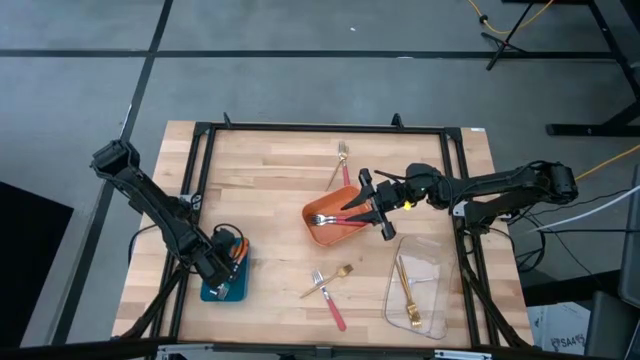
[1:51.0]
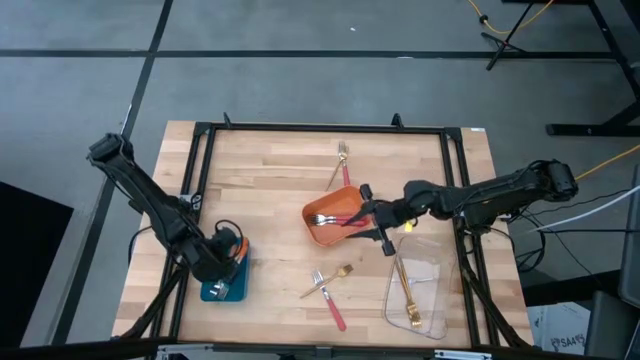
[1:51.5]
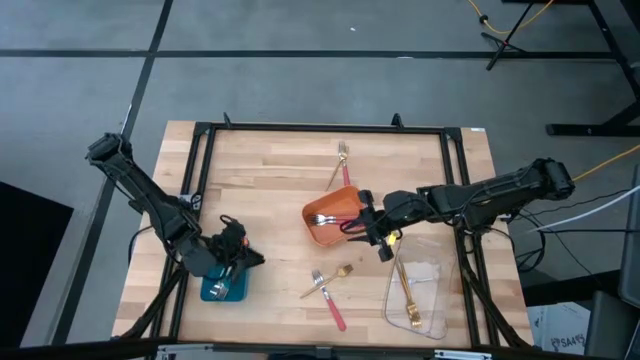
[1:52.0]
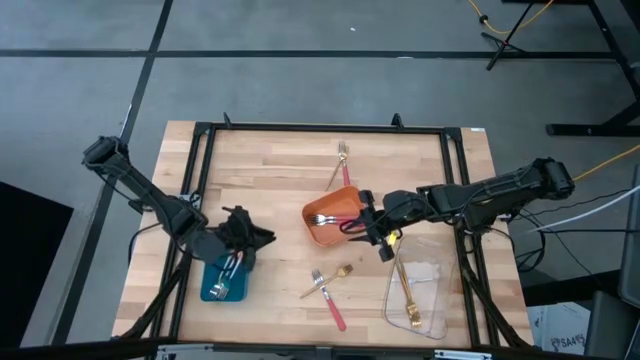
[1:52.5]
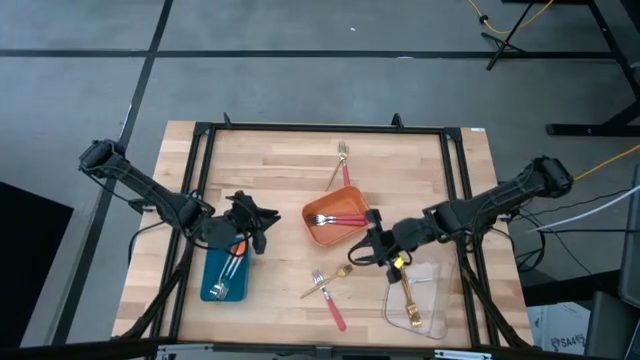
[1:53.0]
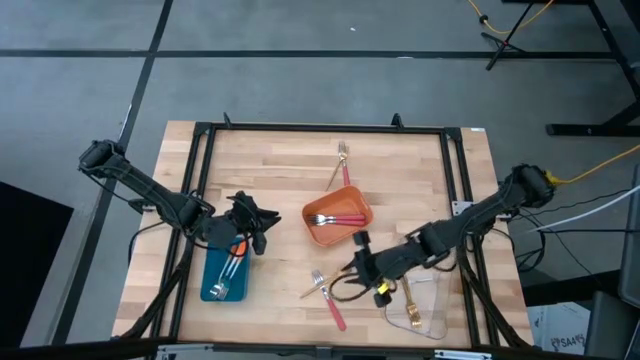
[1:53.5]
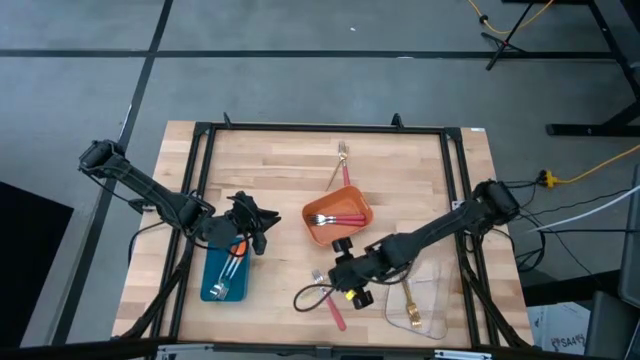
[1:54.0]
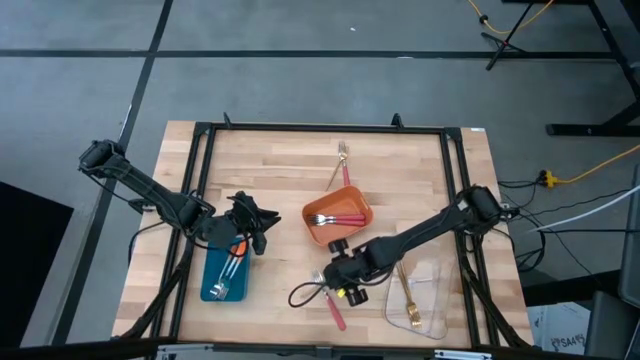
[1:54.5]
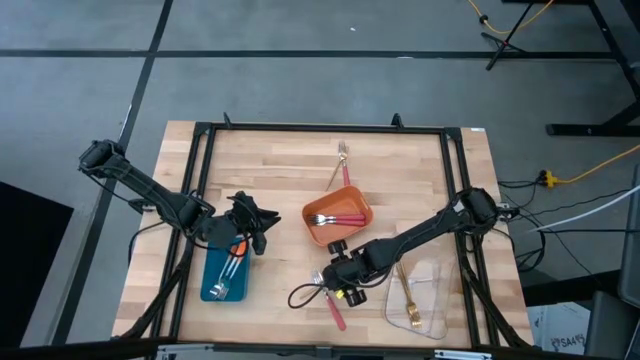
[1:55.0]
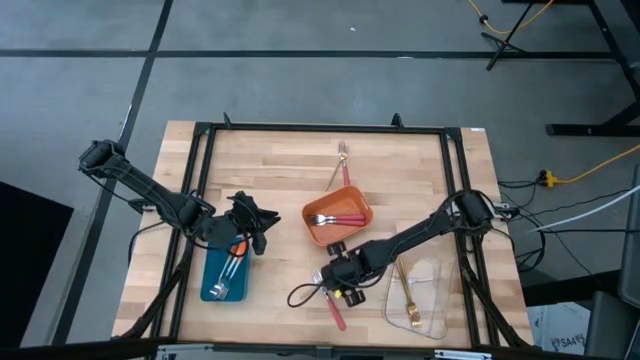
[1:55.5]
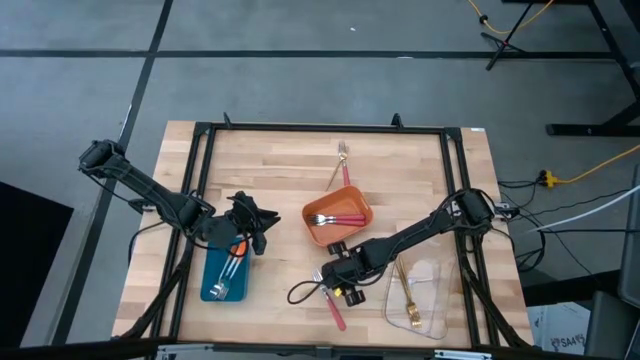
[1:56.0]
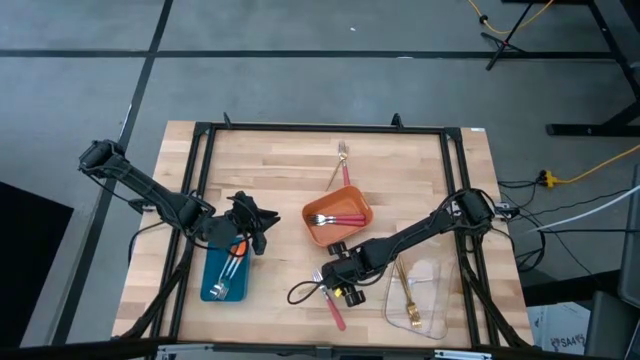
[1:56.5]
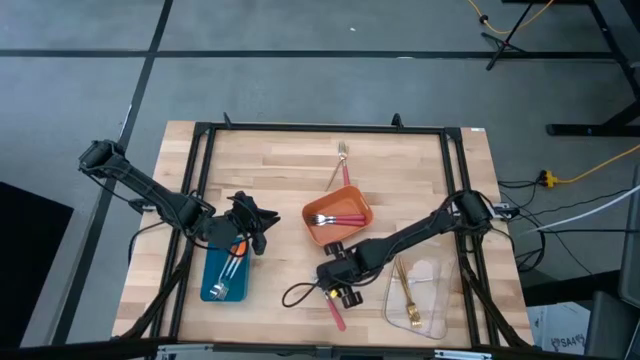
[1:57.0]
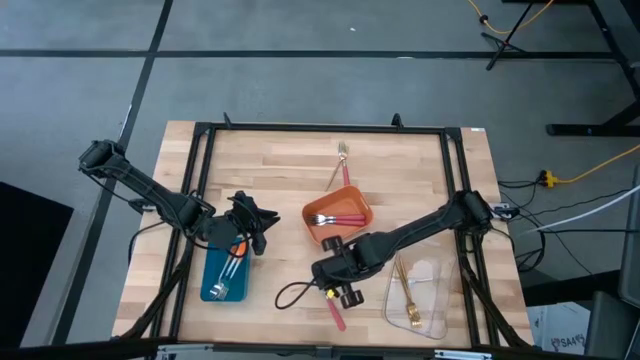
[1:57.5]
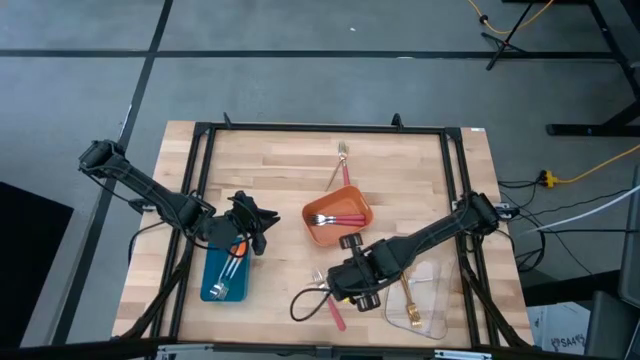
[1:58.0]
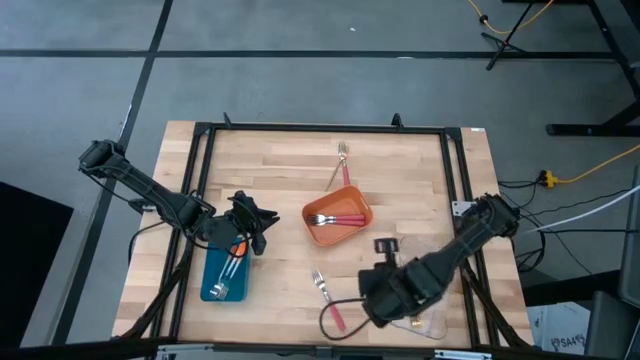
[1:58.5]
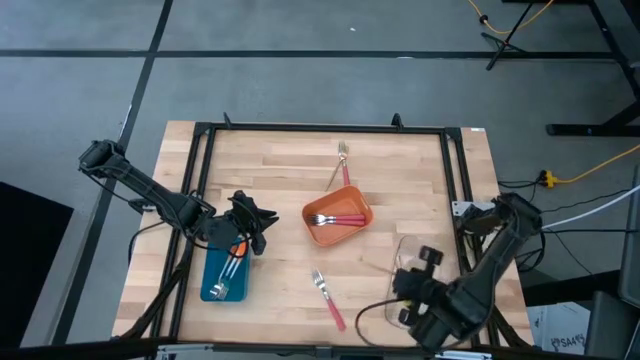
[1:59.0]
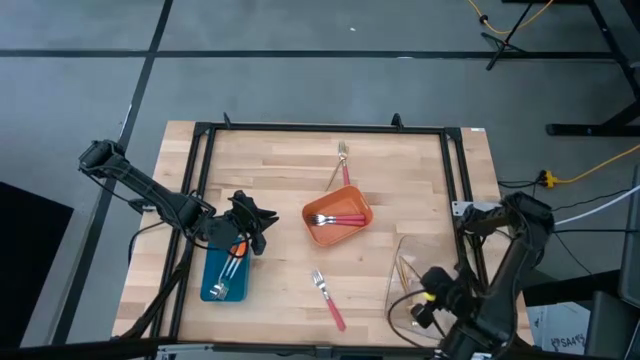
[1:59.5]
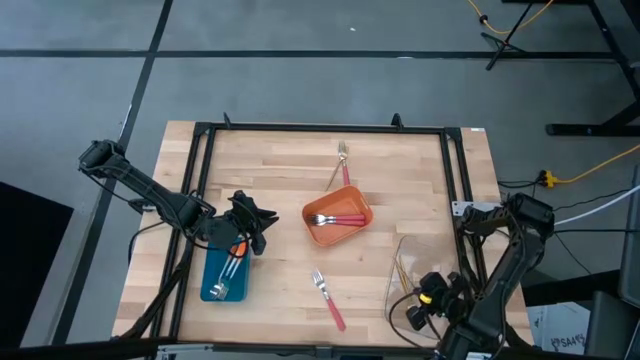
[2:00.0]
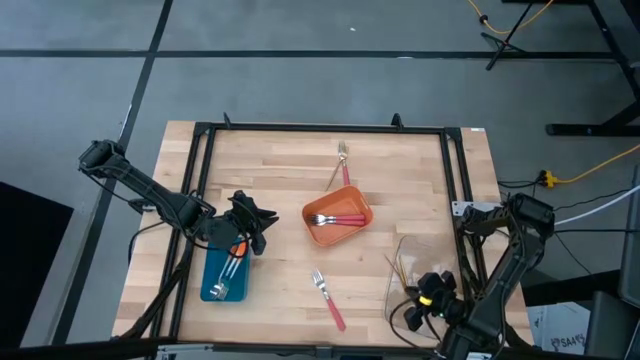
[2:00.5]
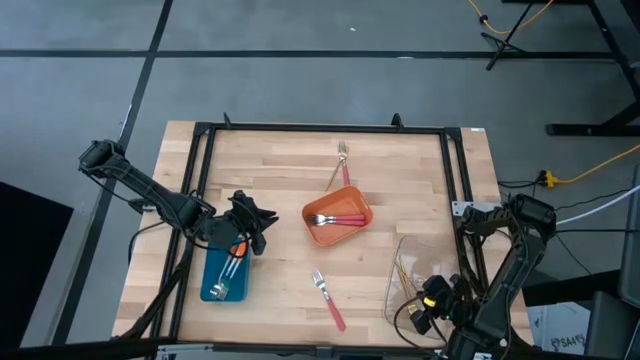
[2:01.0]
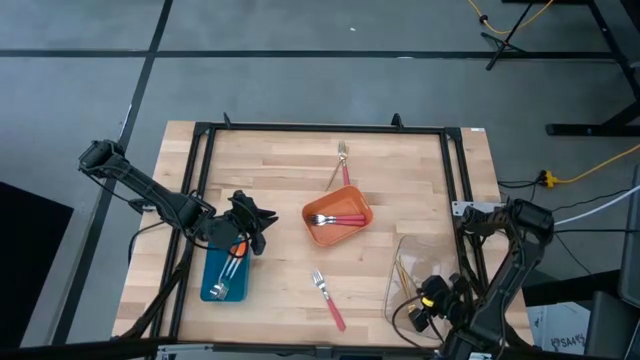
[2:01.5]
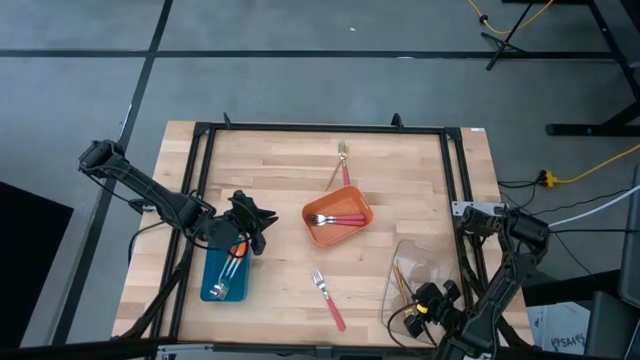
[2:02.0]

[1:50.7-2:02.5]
Task: Sort silverware by color (type)
Put the gold fork into the transparent bin

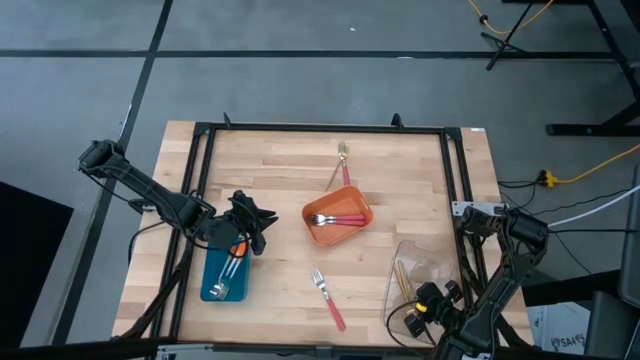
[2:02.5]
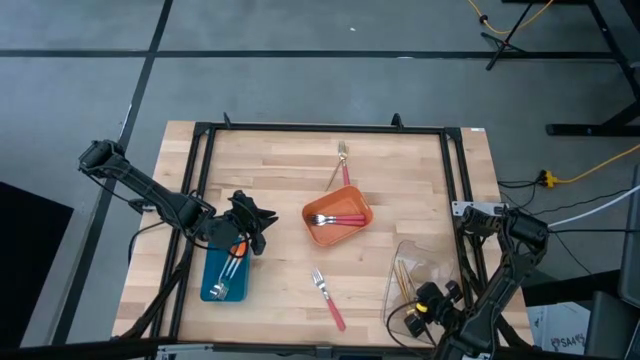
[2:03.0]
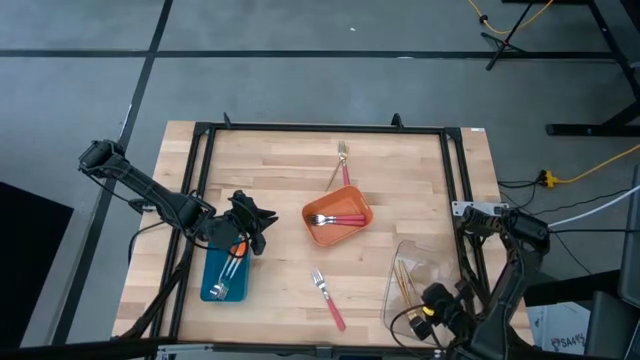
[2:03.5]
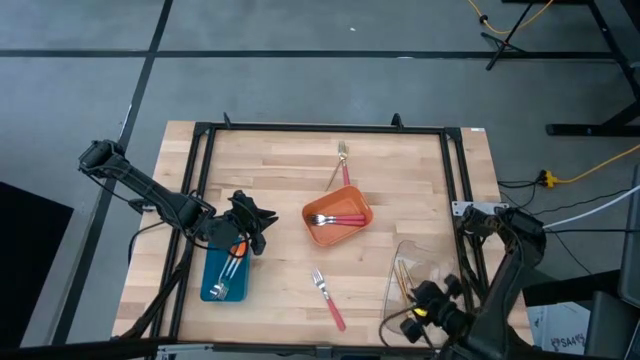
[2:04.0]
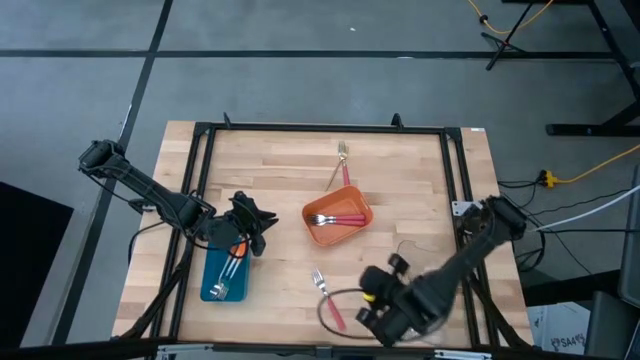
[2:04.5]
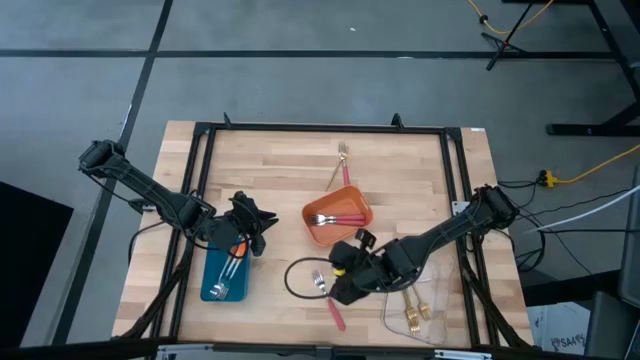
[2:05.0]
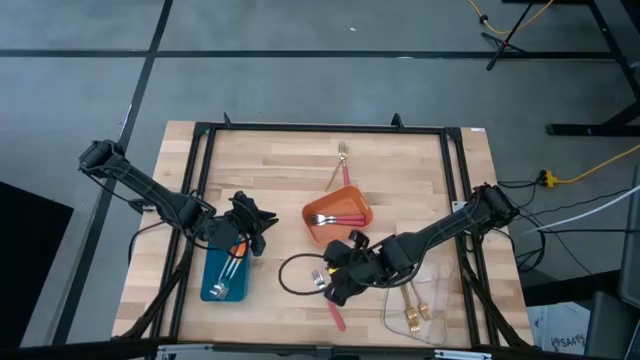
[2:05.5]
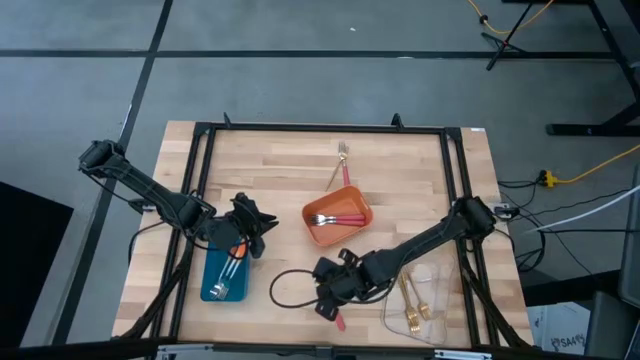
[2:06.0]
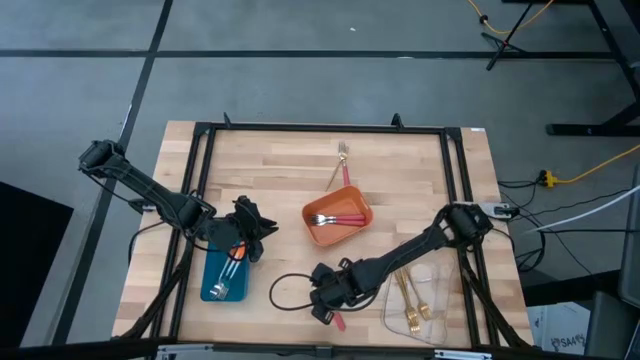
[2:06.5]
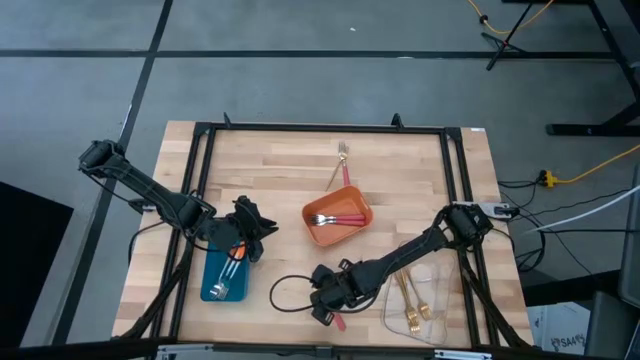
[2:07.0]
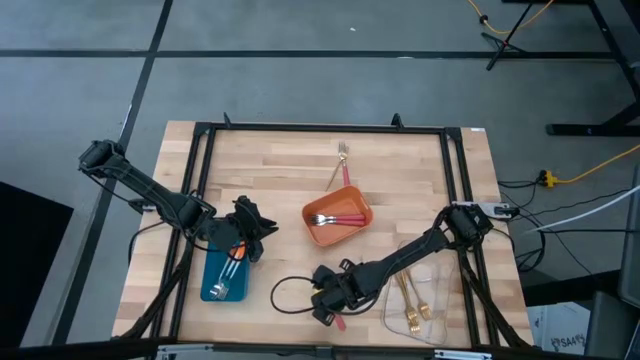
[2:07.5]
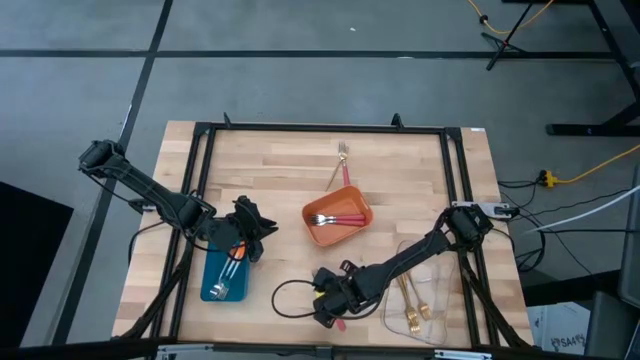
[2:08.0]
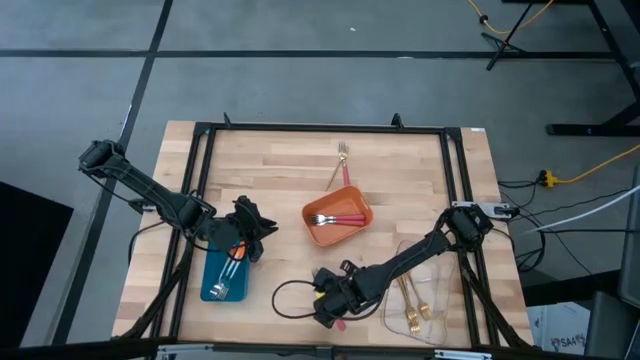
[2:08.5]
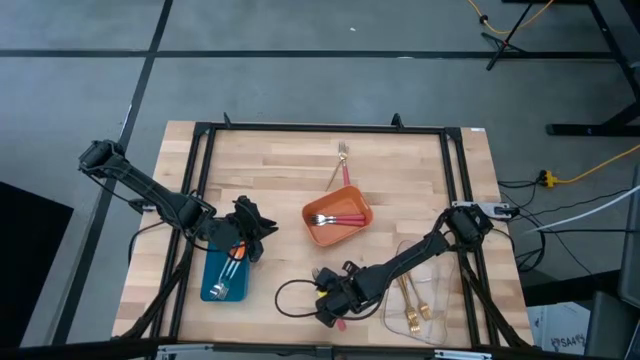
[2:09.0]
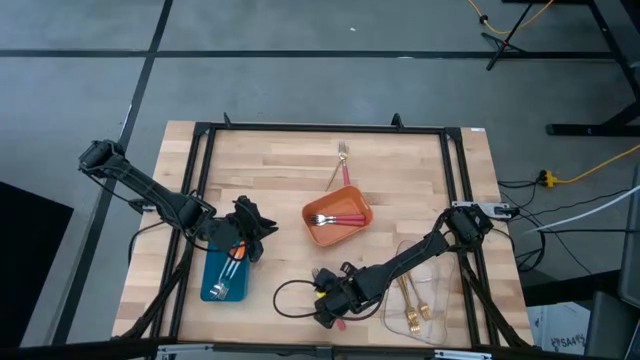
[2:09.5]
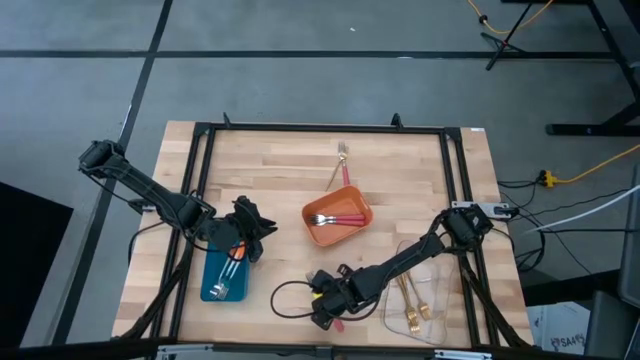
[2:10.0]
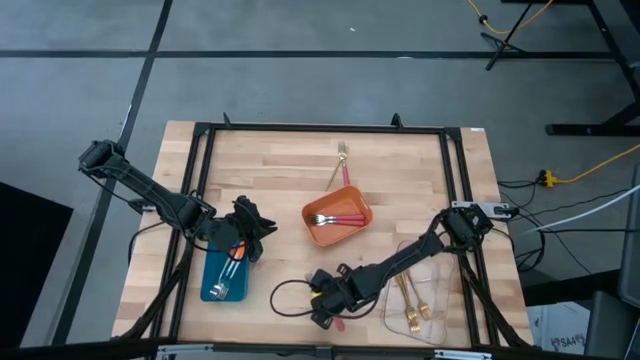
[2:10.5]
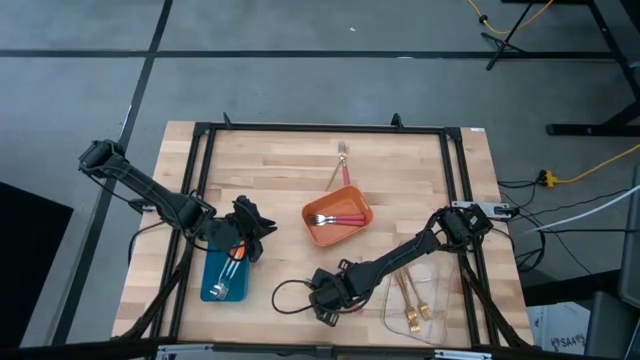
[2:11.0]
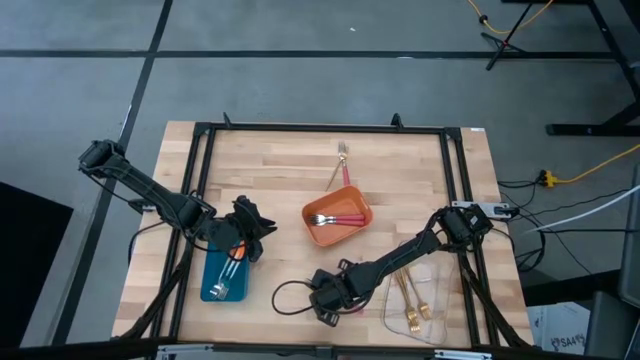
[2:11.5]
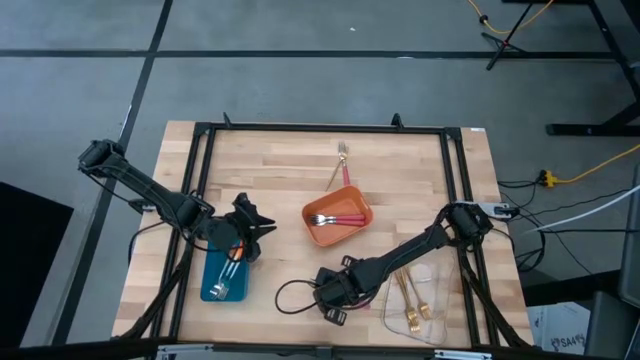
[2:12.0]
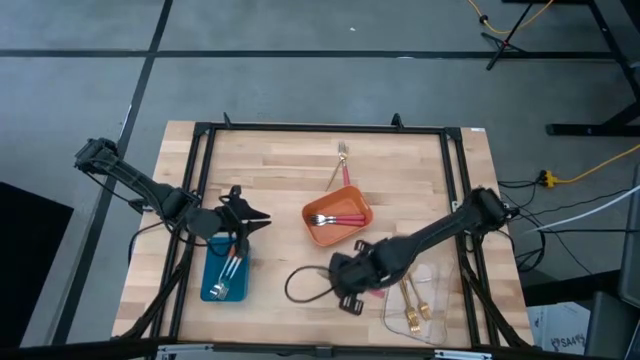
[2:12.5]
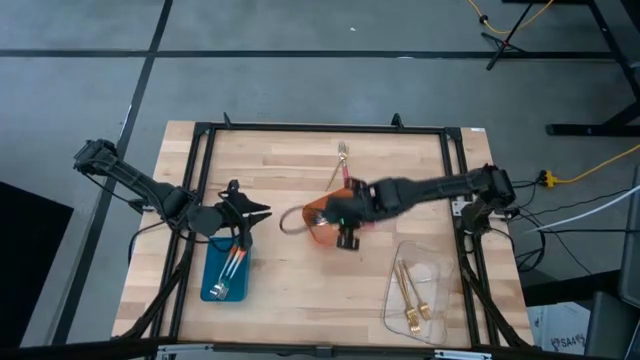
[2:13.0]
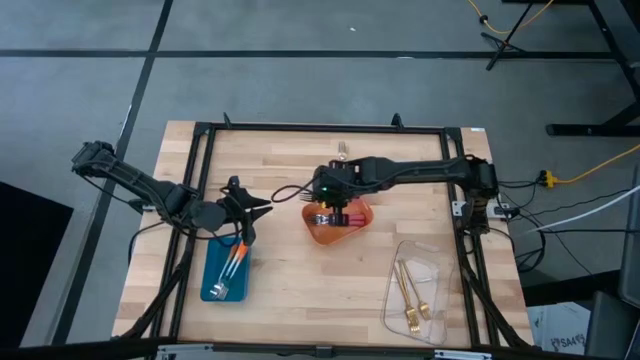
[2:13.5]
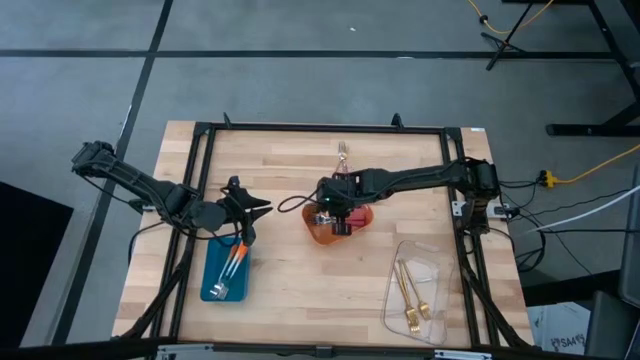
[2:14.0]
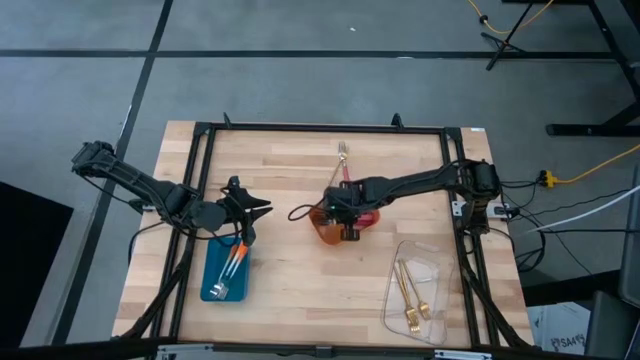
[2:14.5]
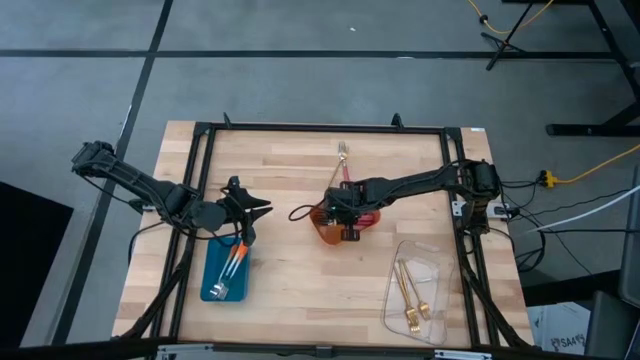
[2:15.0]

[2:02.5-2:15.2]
Put the pink fork into the orange bin
